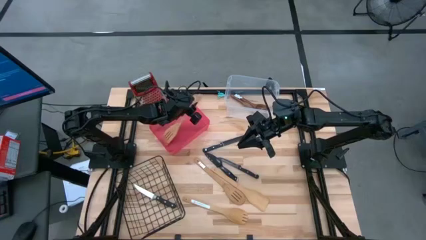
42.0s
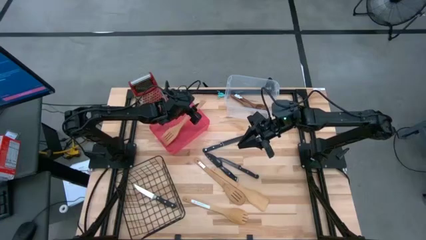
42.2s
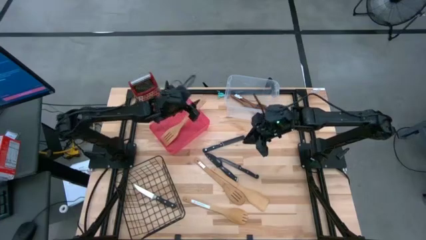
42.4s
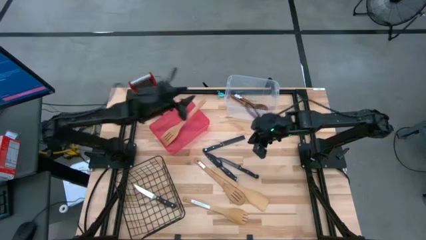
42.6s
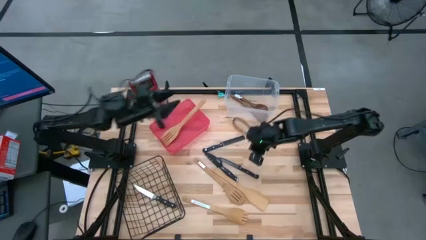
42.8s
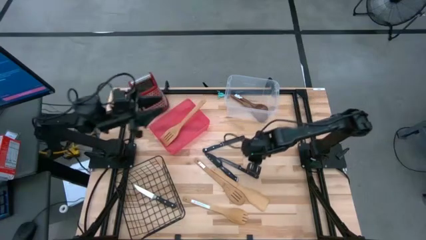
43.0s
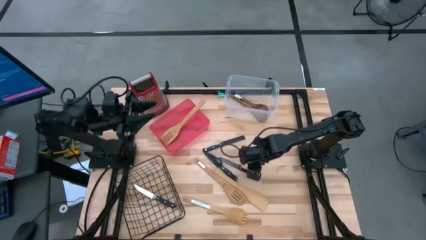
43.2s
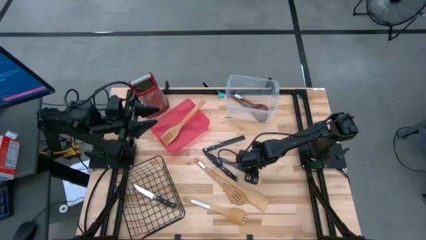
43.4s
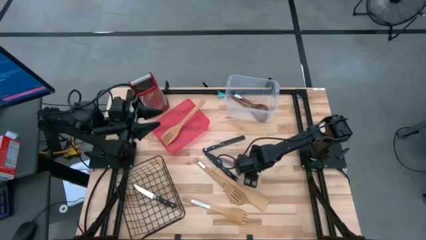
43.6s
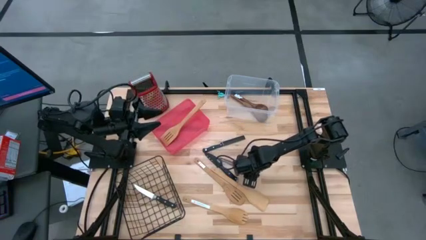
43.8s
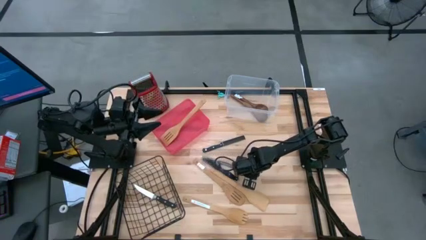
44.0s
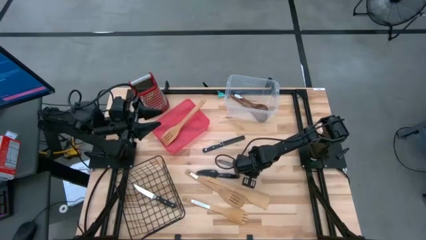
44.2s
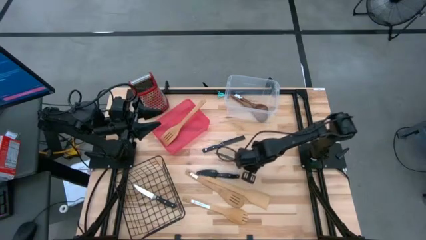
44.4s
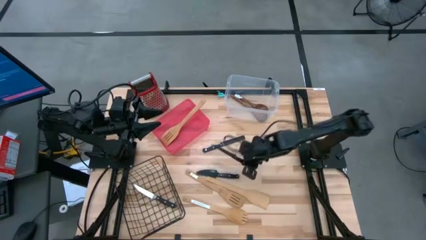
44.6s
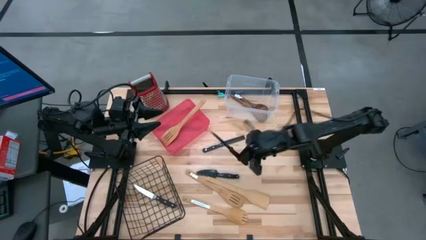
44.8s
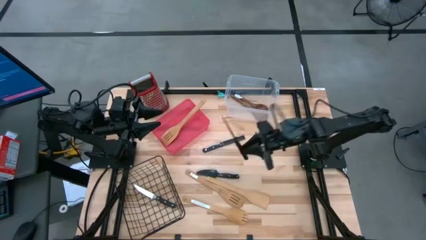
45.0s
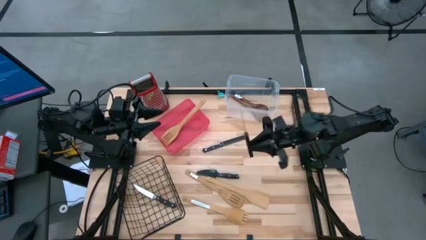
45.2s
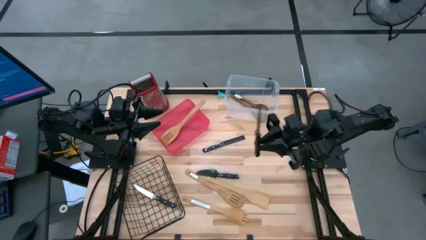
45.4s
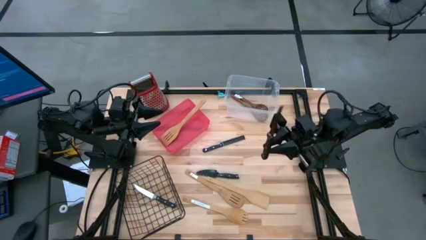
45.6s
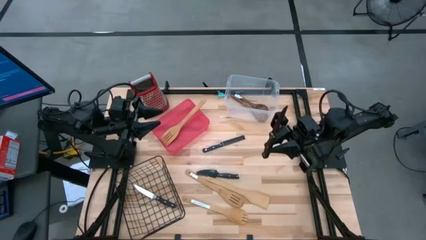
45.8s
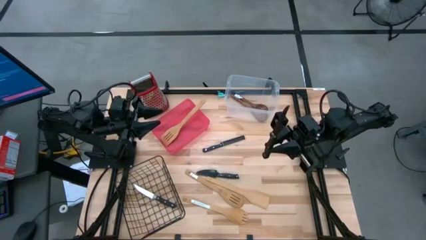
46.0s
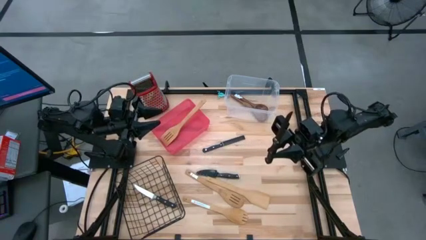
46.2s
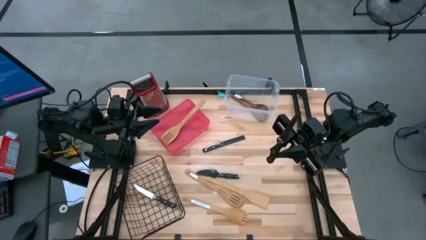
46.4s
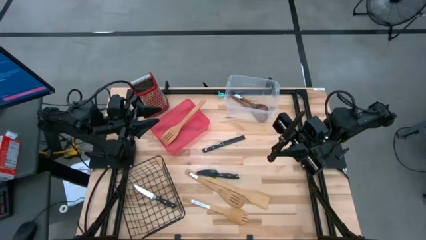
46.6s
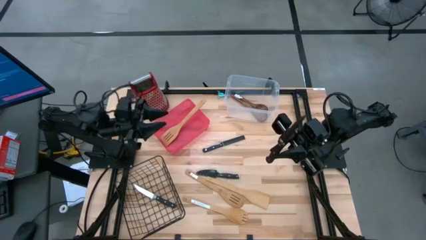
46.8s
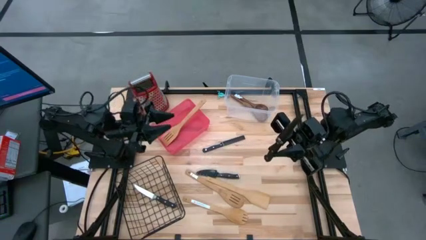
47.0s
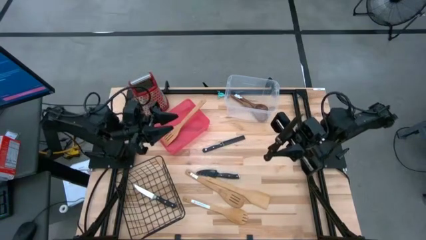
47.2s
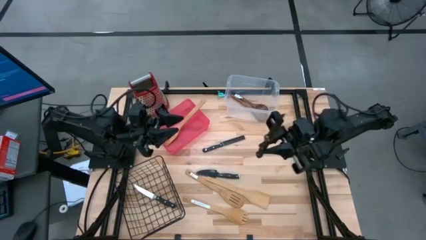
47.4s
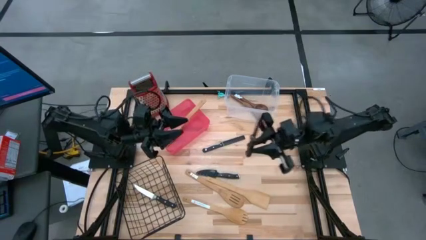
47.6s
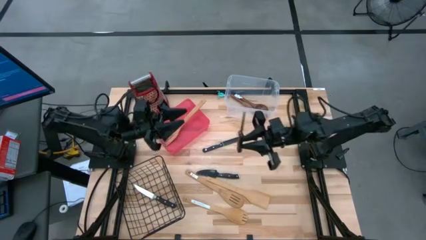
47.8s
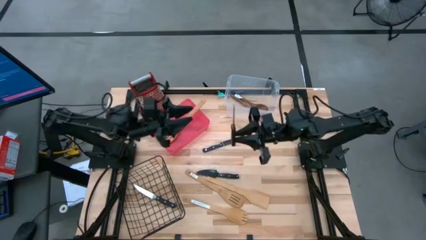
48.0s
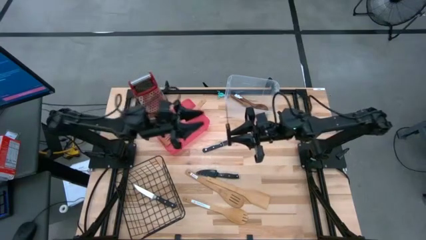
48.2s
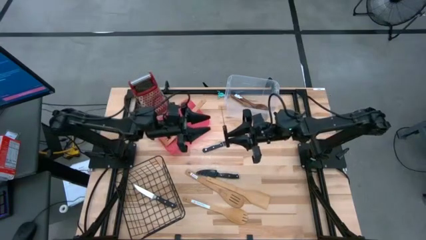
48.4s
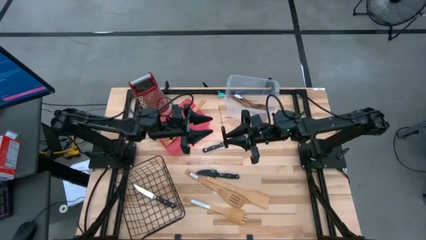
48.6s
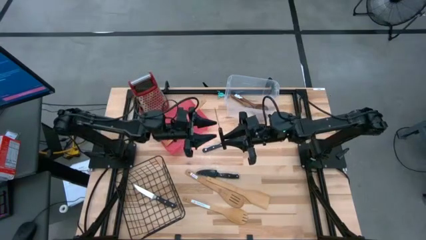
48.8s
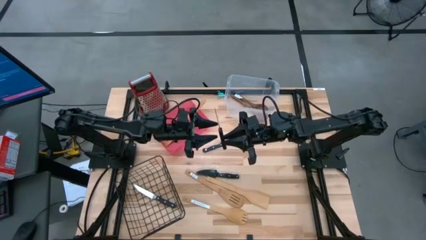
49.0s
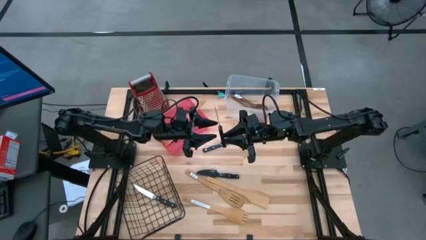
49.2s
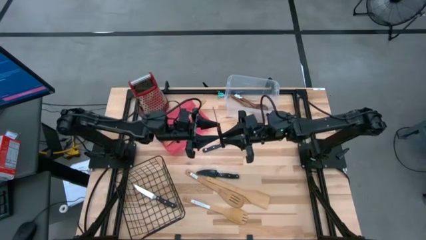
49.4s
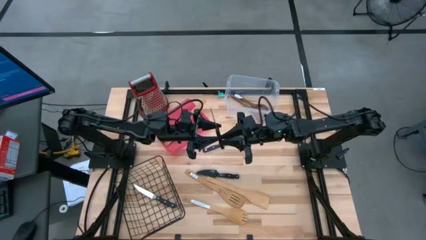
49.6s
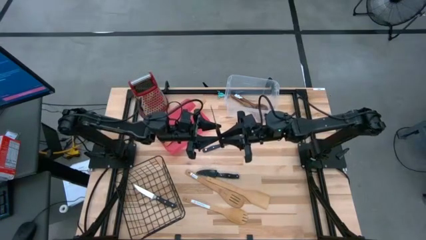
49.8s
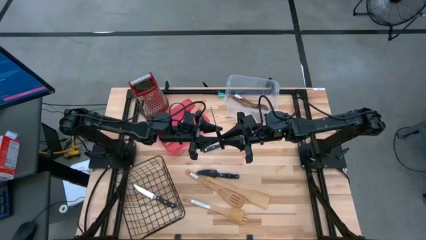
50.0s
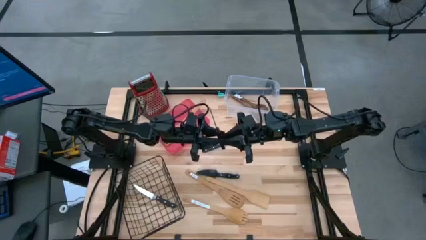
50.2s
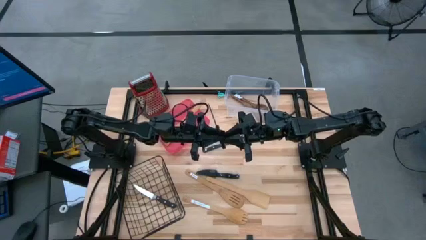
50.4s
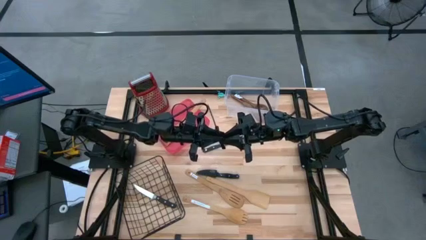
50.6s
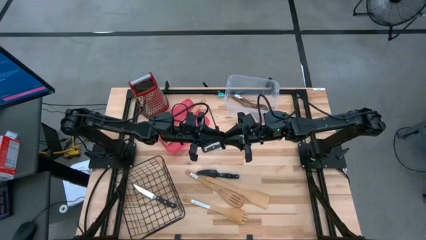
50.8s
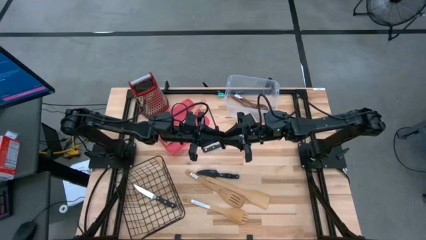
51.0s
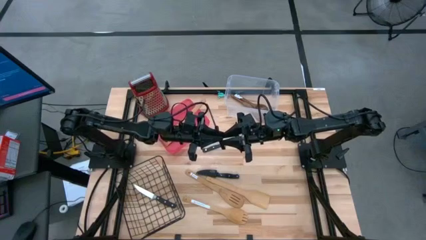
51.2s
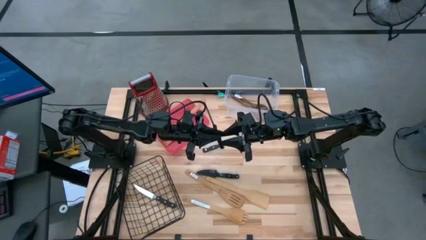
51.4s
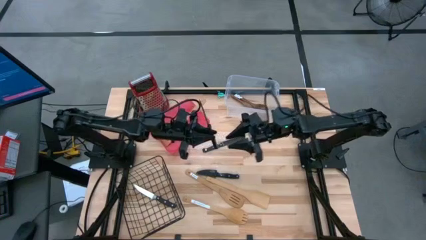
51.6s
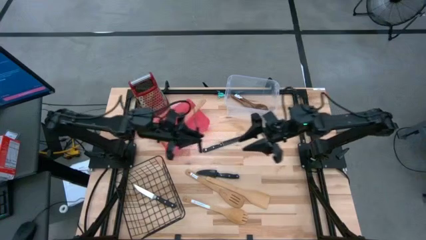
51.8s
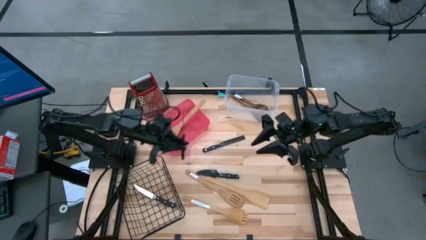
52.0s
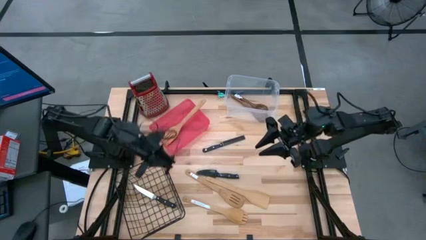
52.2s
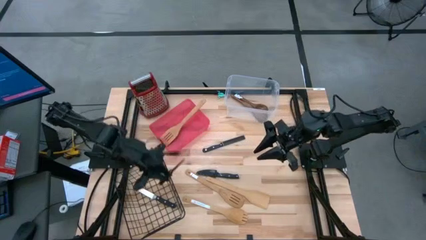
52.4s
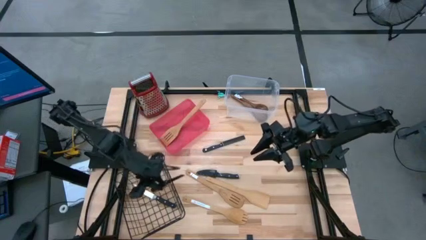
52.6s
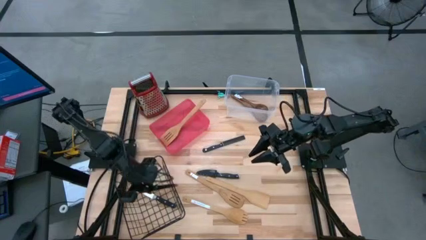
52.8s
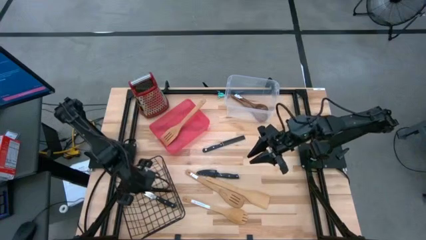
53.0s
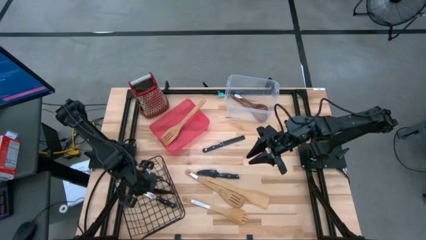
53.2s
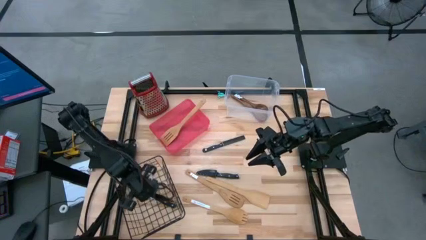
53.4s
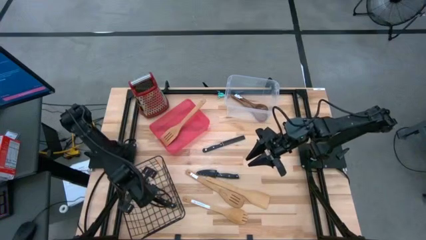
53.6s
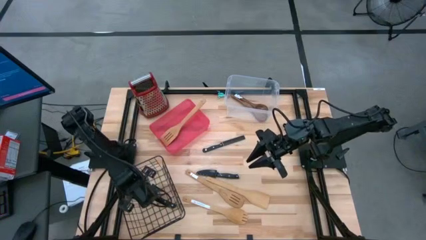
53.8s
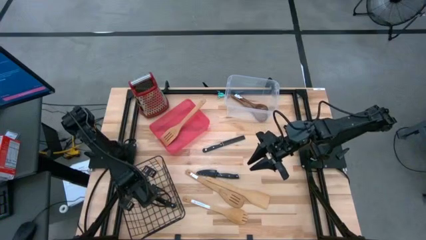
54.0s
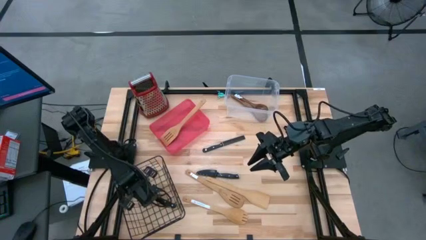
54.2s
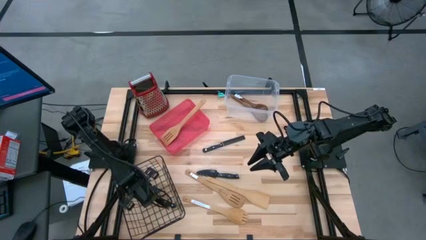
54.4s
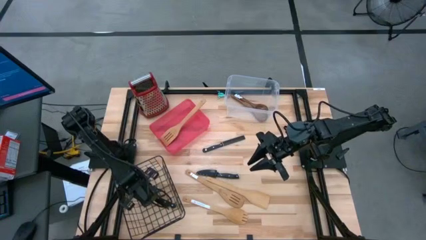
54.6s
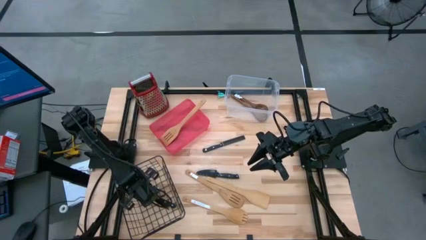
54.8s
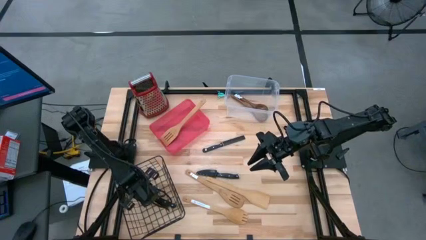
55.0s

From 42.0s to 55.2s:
Task: Pick & Place Kitchen Items
Put the black kitchen knife into the wire basket

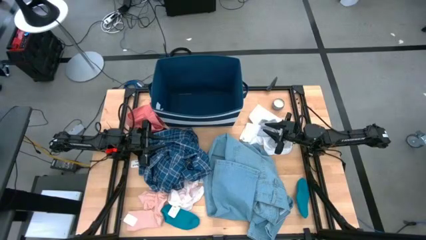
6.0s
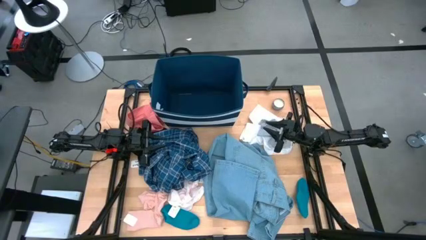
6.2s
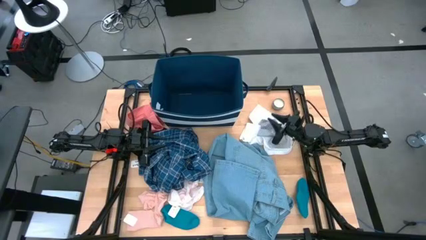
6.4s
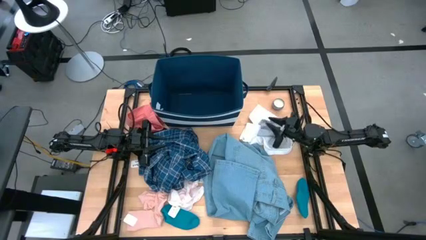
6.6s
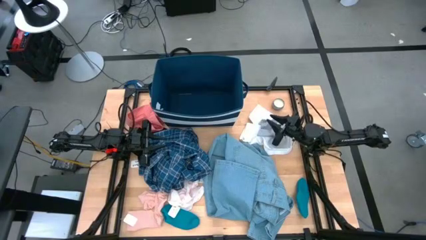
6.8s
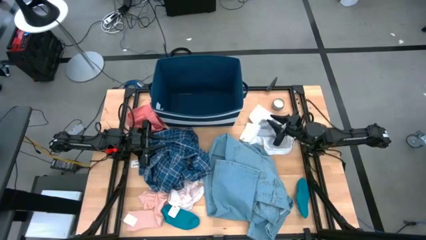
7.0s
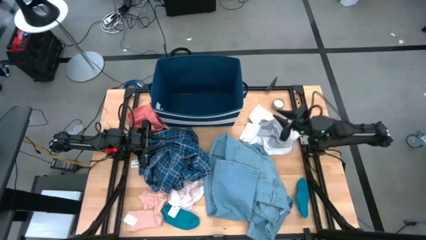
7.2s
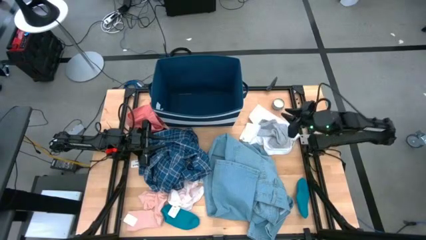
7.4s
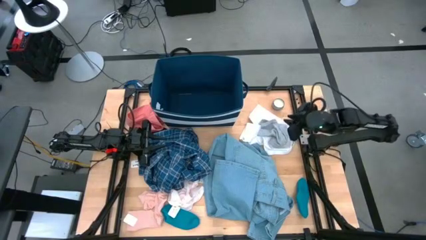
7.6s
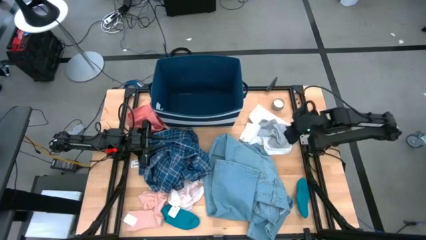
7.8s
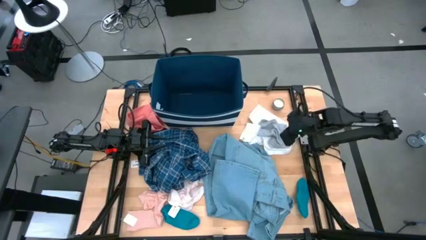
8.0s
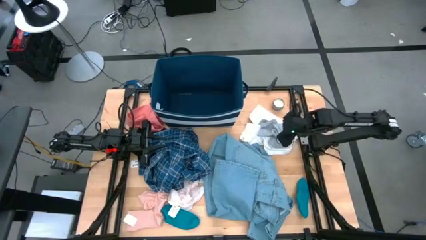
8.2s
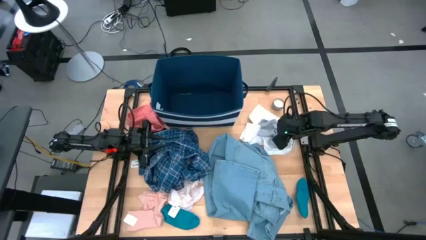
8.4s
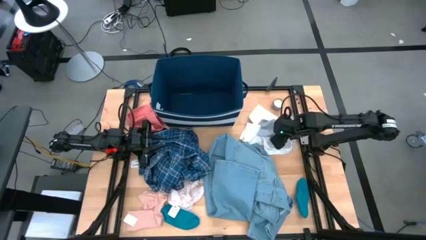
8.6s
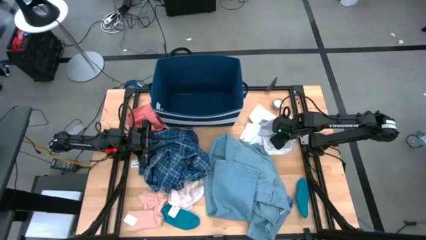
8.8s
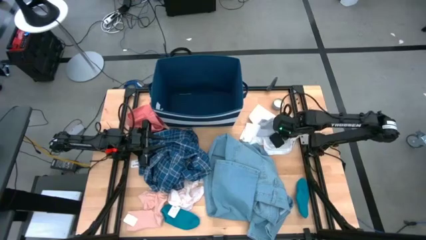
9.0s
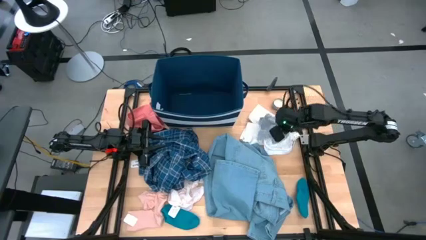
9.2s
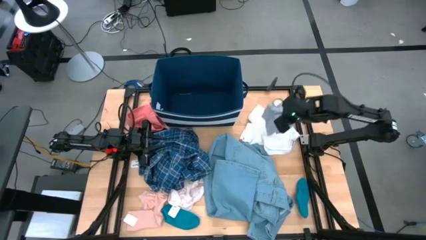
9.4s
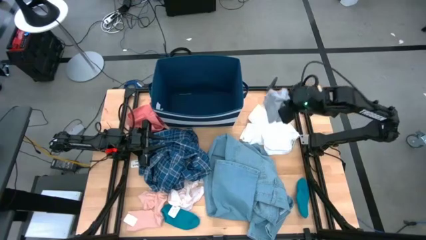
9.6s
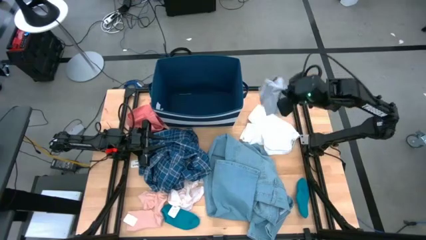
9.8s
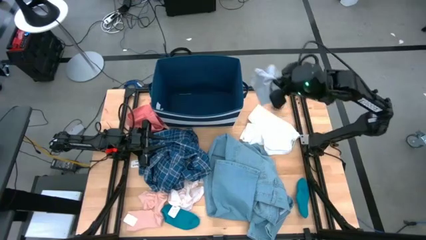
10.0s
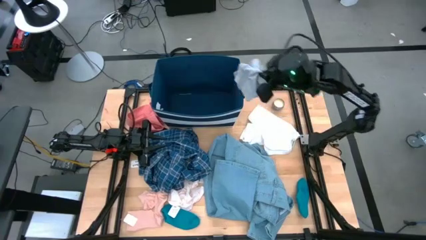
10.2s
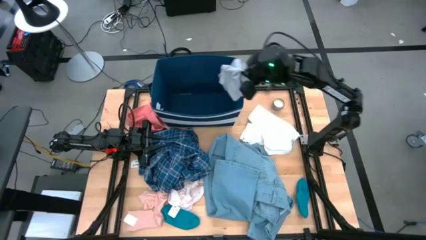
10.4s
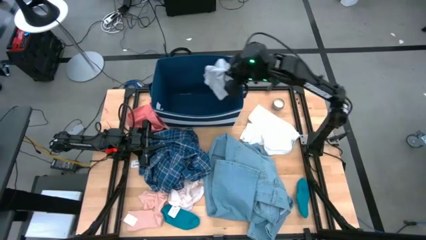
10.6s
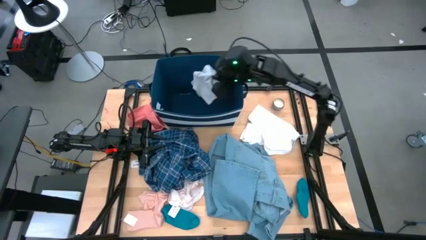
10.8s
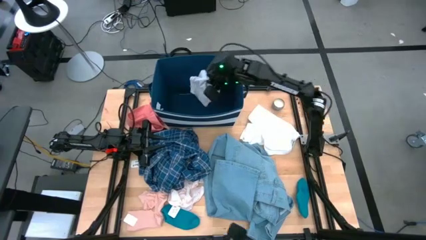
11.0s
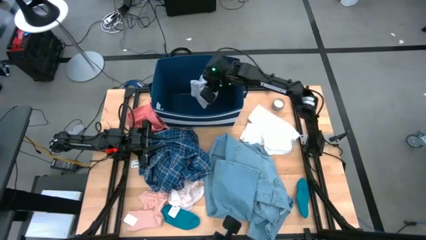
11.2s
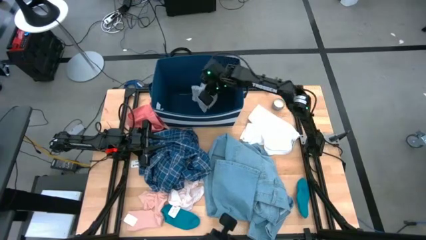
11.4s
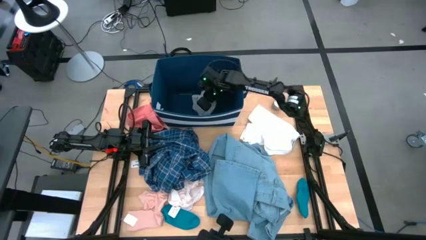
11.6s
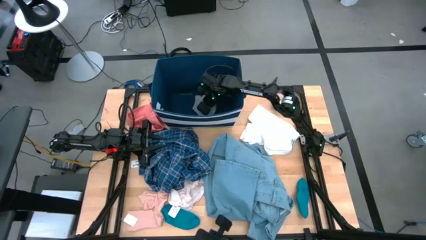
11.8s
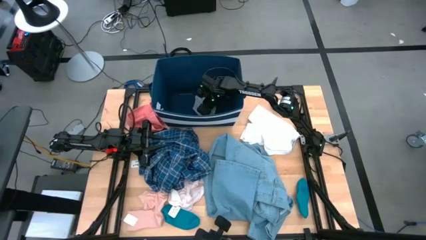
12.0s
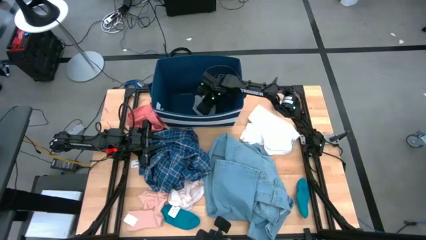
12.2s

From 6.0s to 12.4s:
Task: Sort clothes
Put the gray underwear into the blue laundry bin
